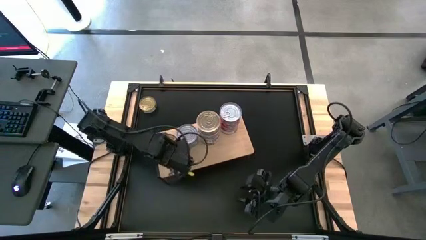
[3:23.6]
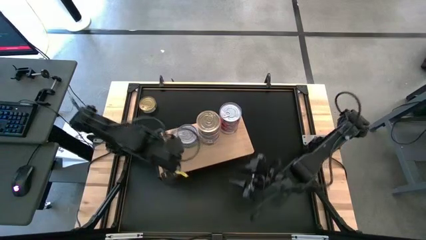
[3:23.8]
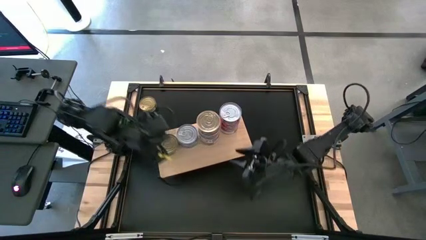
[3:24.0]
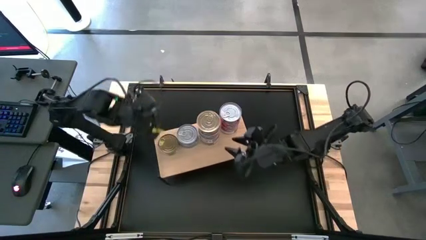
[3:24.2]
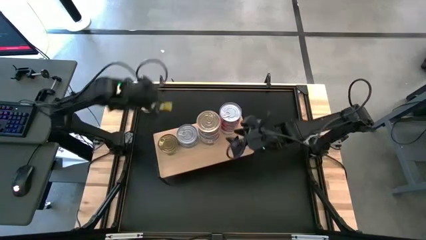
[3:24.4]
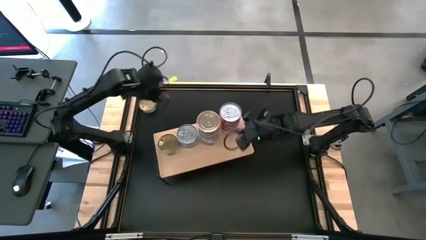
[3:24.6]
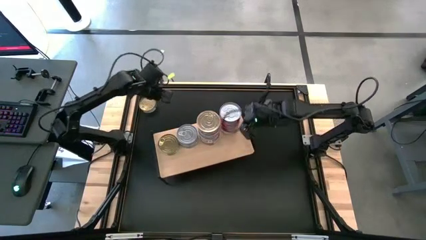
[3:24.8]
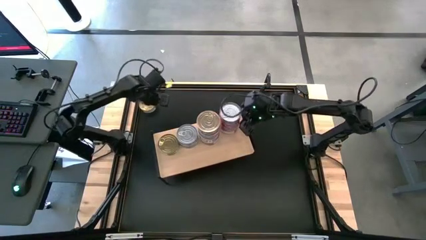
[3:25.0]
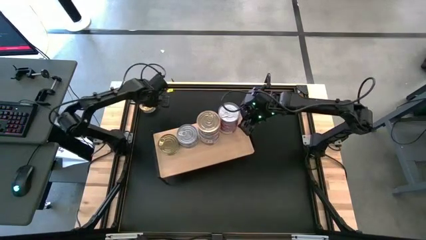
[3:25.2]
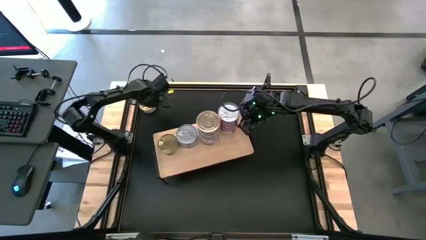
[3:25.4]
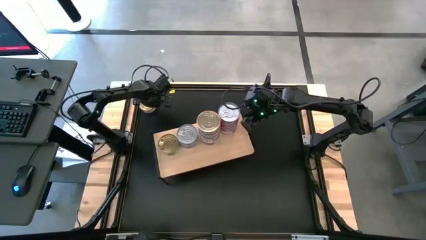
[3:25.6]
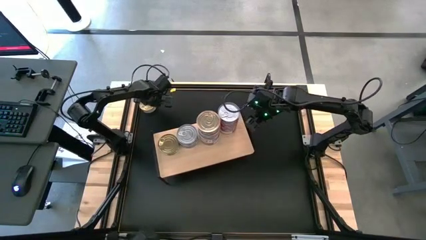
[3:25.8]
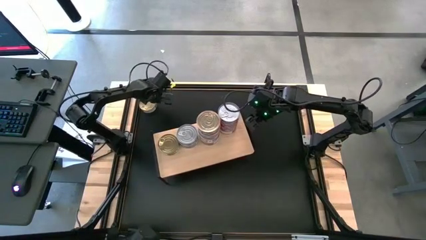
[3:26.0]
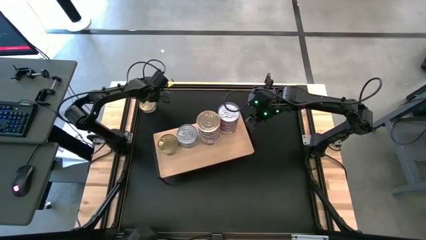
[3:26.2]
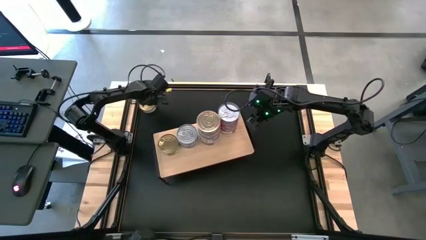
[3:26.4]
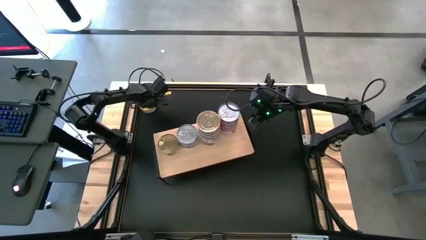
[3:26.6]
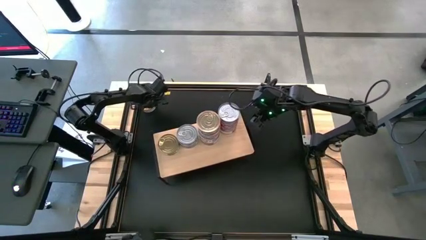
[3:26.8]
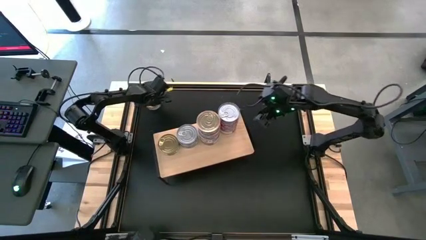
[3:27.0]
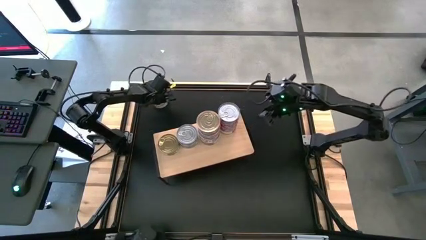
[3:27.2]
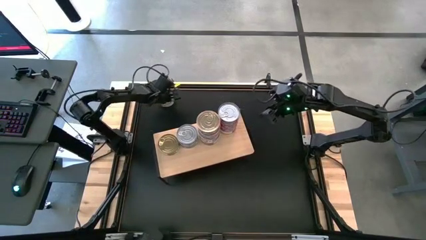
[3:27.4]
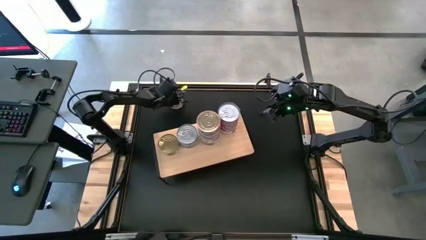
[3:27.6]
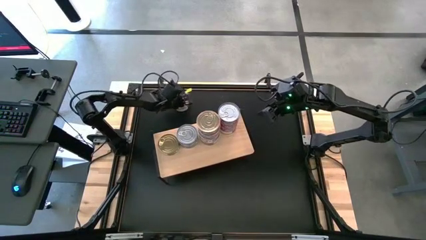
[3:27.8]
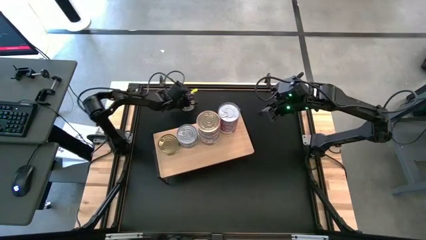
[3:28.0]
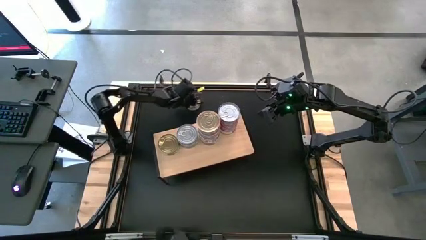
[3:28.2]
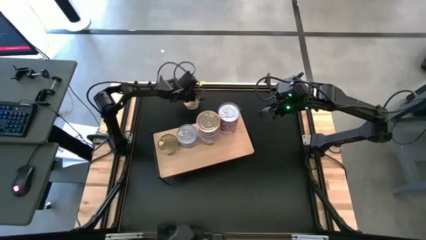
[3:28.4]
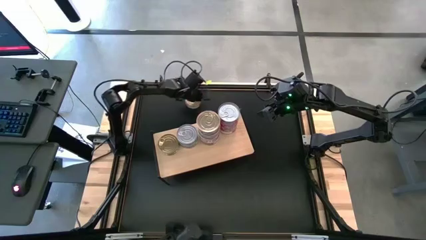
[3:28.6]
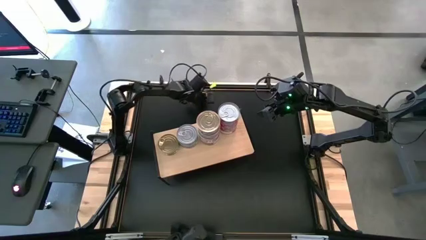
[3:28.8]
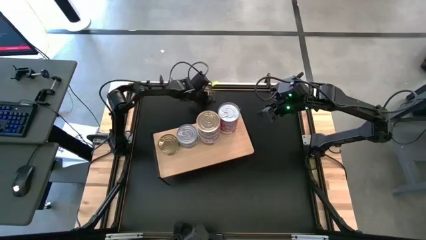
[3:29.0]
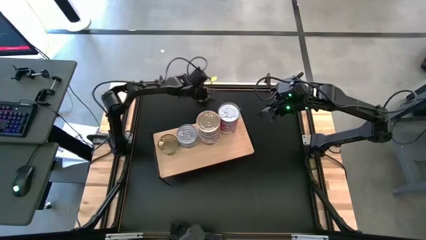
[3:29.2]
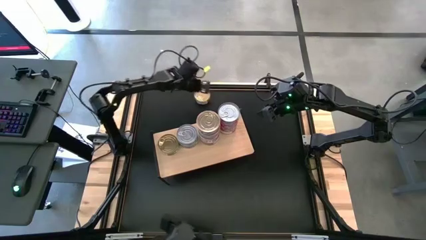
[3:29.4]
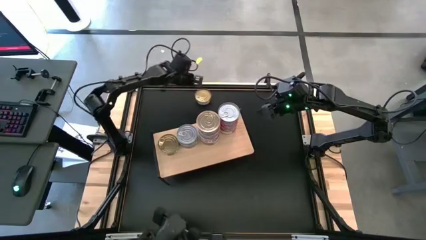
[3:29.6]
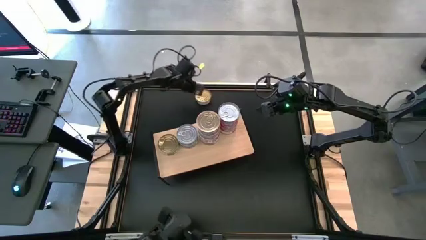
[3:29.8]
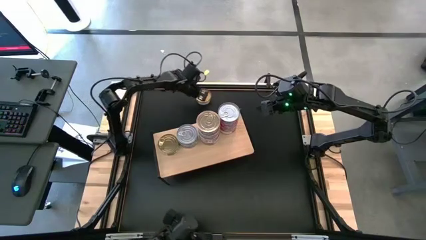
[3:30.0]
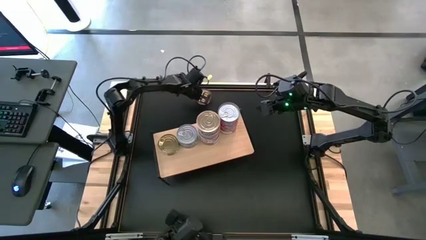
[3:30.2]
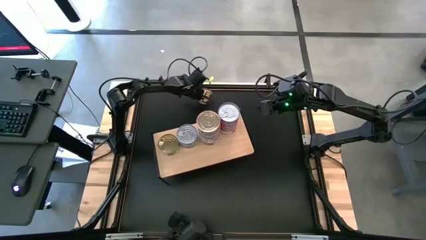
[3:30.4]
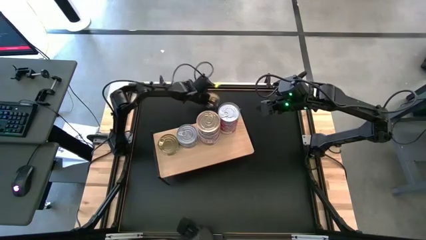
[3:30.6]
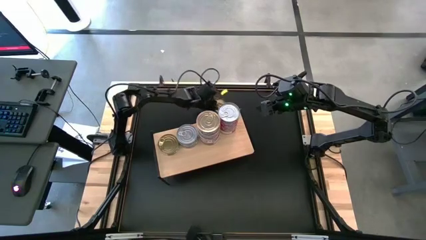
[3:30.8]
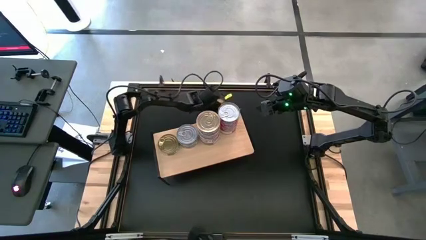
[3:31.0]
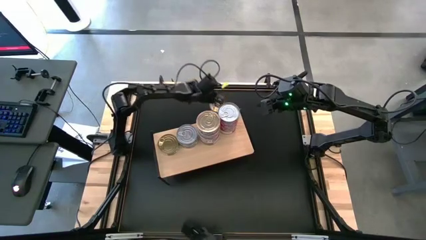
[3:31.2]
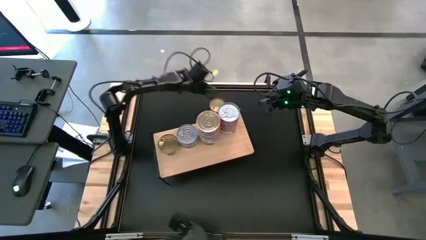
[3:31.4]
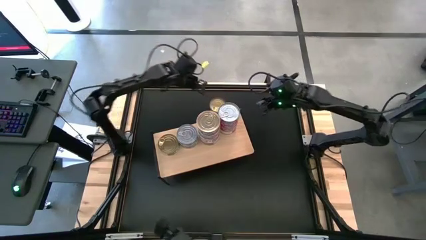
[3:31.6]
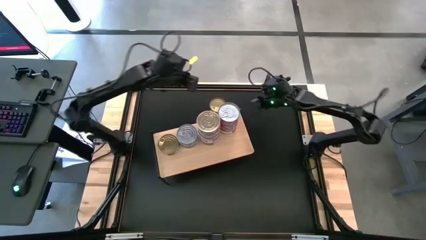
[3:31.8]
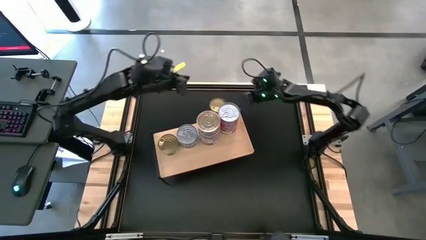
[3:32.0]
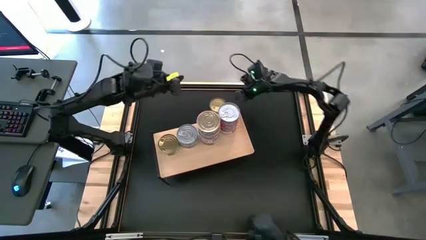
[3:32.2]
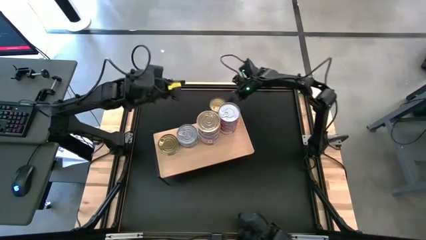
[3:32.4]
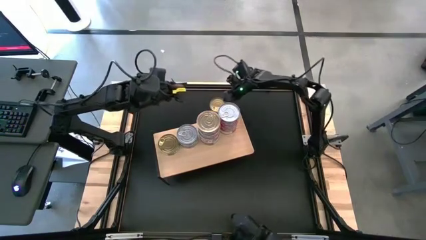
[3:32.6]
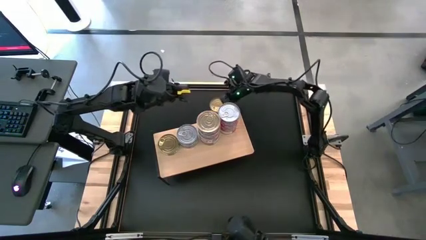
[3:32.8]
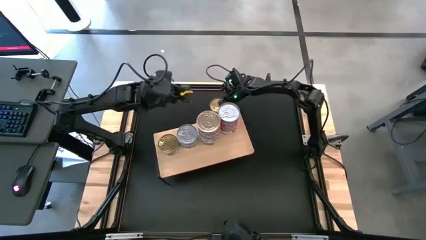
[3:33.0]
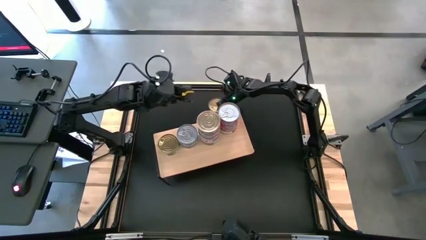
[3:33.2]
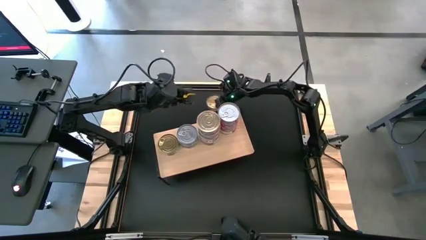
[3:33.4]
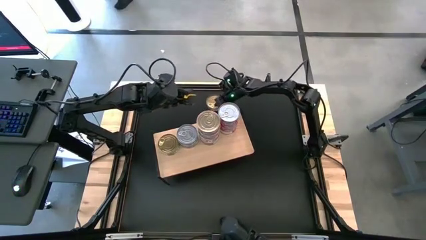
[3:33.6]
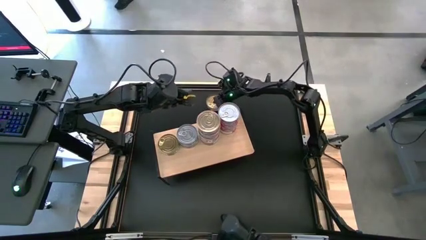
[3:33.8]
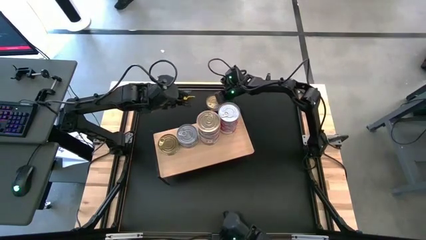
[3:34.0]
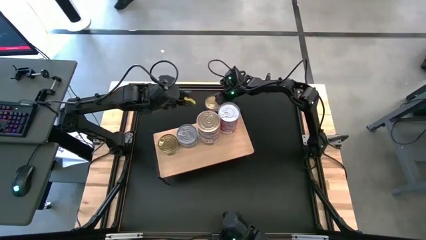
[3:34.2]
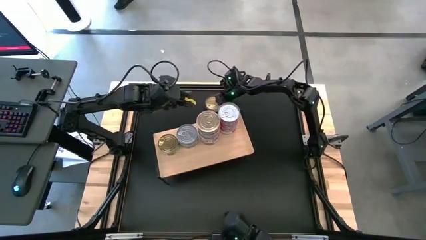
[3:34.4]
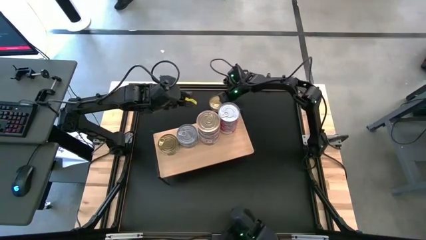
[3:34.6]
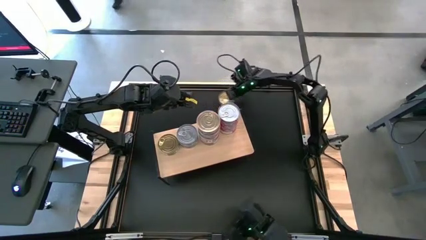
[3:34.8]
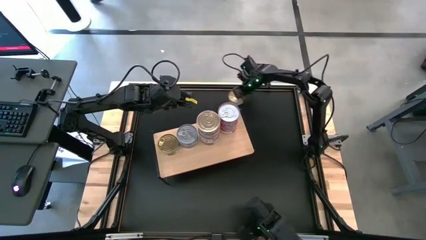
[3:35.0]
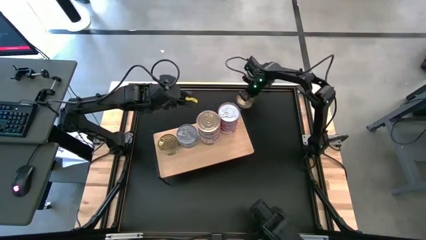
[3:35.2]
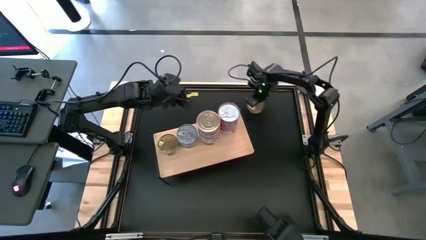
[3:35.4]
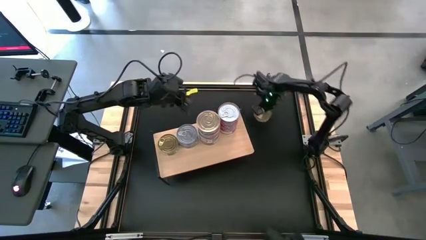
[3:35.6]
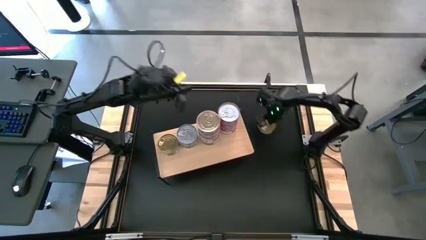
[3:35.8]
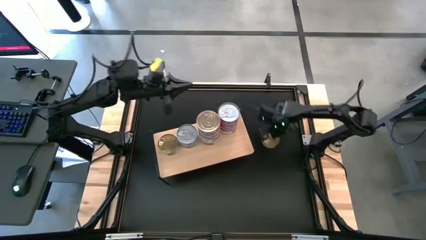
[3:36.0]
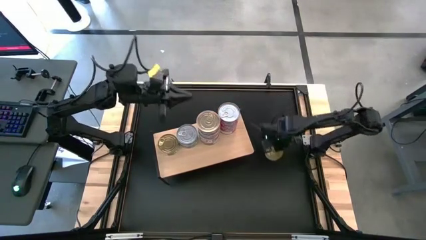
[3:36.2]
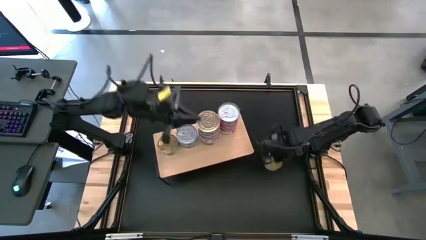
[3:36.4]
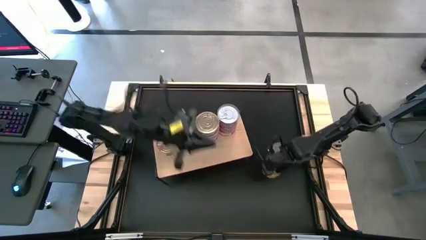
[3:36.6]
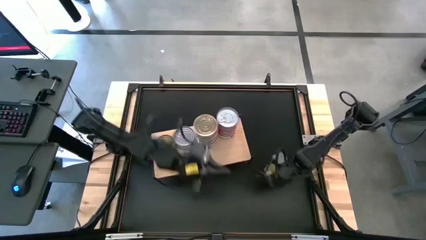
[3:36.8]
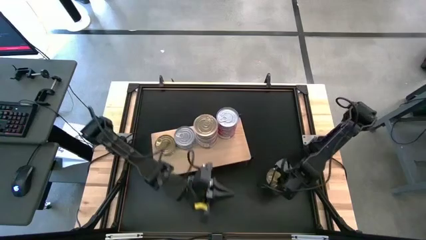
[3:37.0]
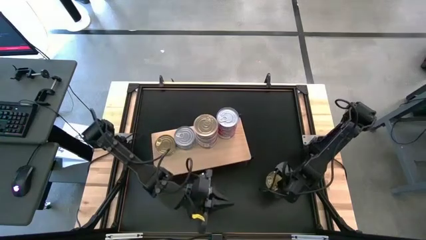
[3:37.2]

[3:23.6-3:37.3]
Task: Stack canned seafood by type on shelf
Stack the green can on the top of the other green tuna can on the shelf

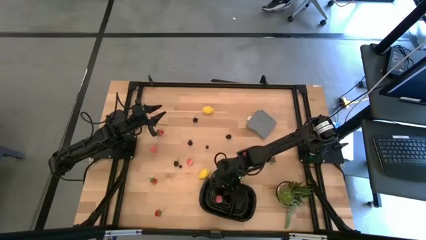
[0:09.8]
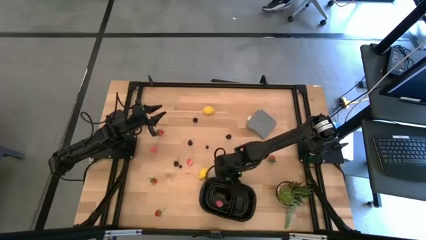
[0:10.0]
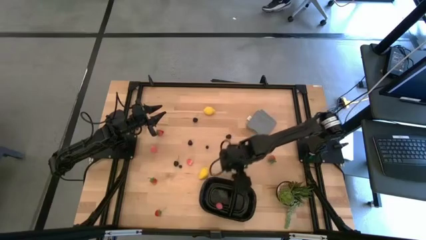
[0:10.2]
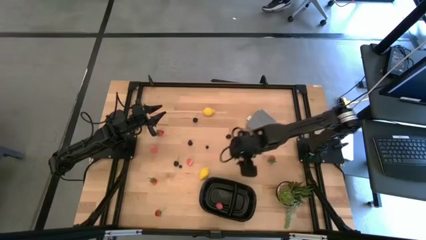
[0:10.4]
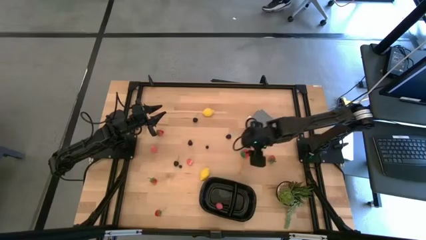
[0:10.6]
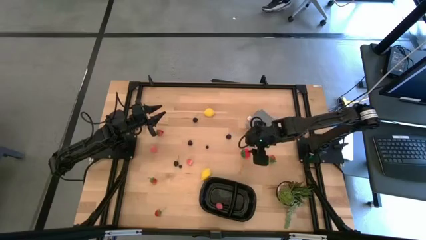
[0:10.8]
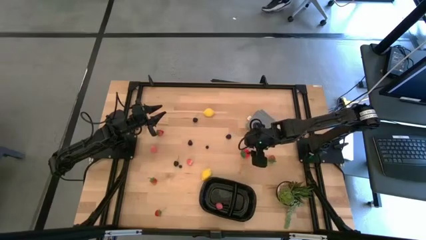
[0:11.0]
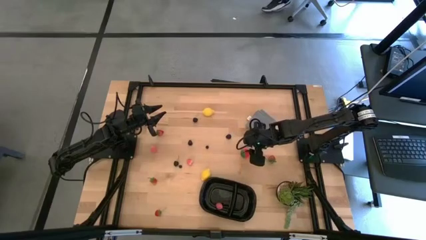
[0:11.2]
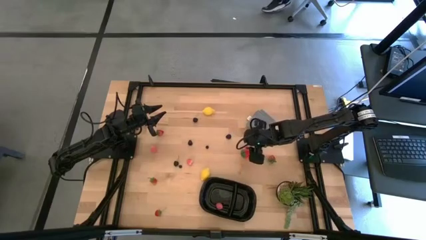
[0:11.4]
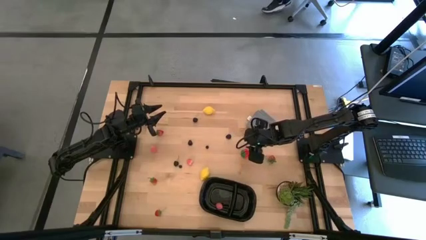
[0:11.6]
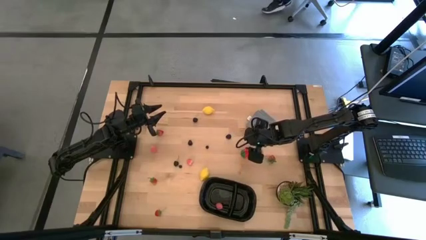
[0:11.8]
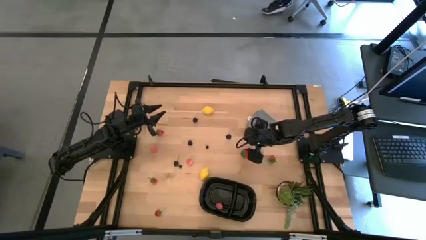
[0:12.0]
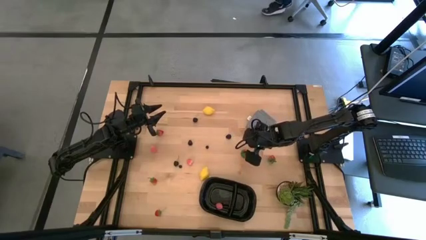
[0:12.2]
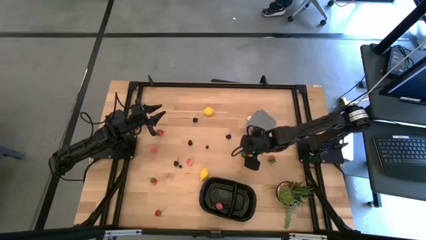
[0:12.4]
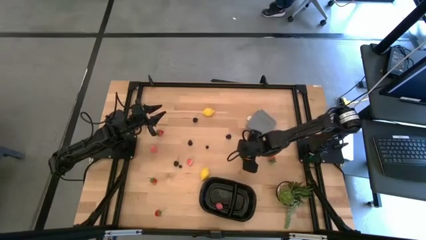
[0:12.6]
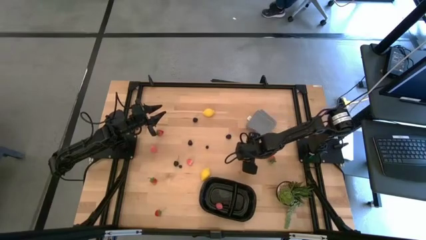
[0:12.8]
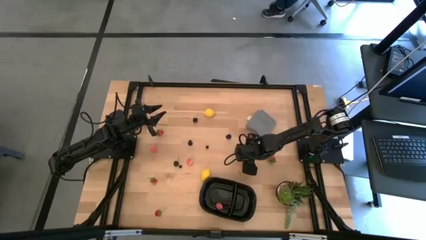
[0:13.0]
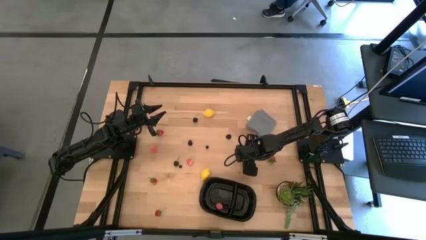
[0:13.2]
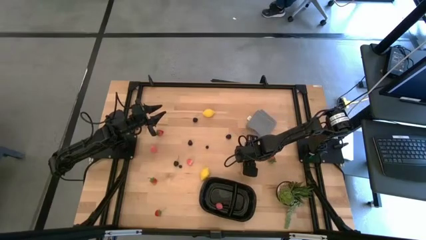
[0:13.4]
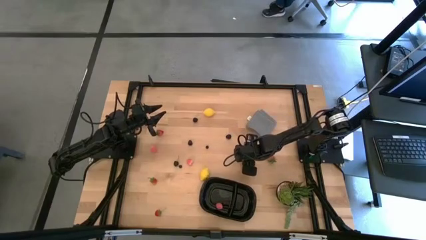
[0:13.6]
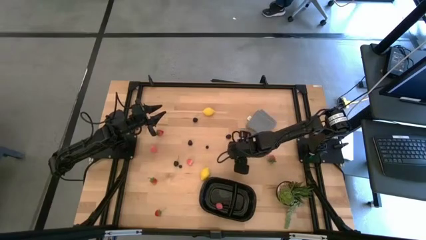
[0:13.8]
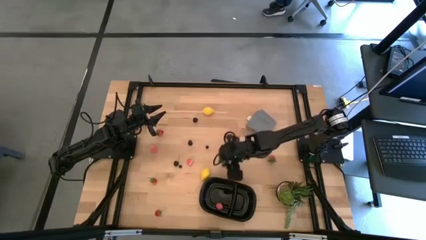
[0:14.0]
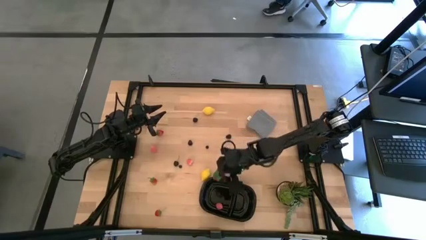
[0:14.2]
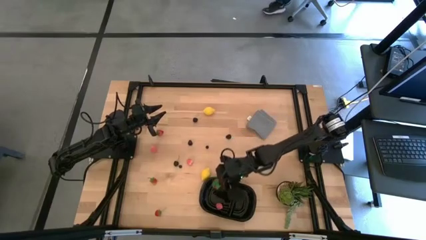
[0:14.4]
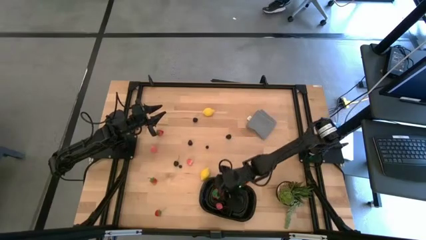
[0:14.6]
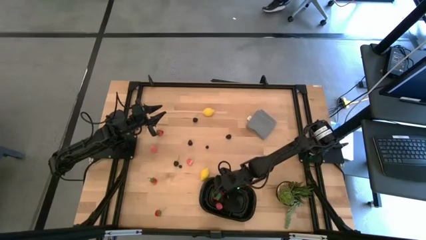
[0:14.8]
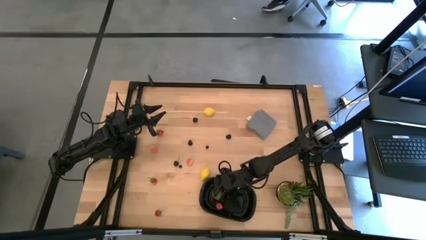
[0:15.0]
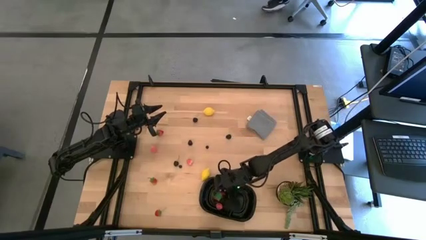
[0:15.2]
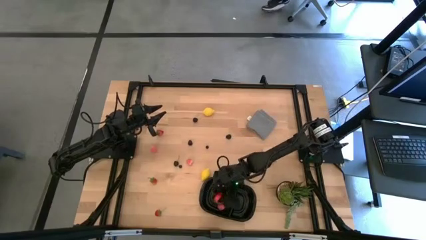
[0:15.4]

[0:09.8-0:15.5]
Task: Pick and placing Produce into tupperware
Put the strawberry into the black bin
